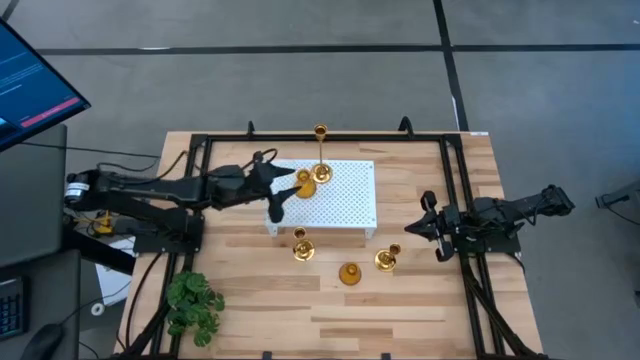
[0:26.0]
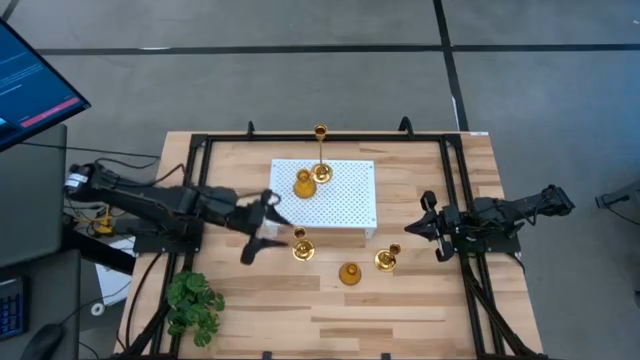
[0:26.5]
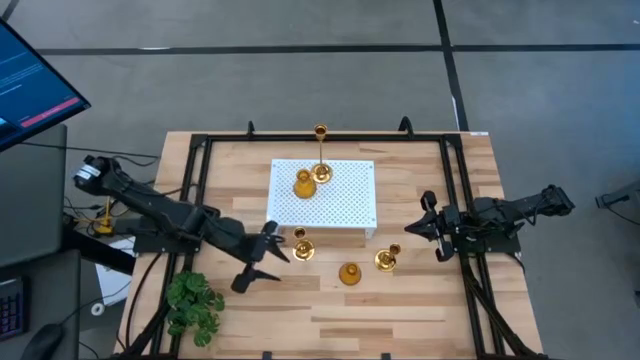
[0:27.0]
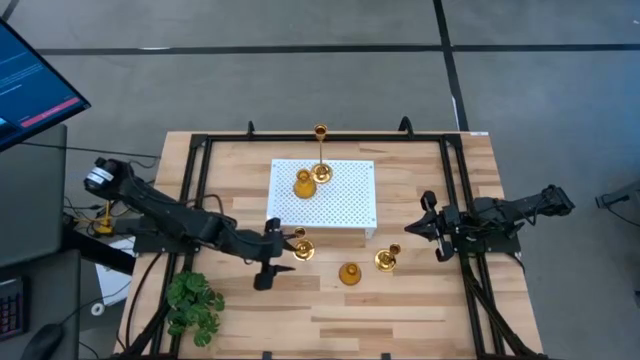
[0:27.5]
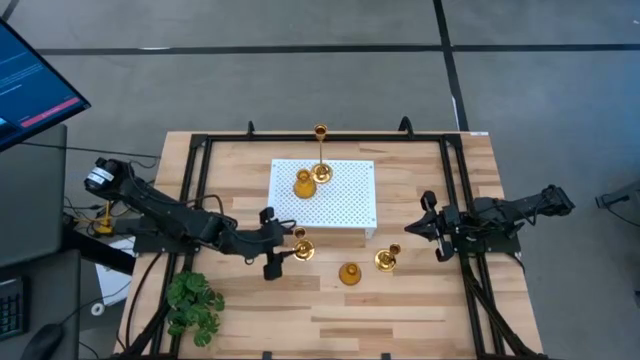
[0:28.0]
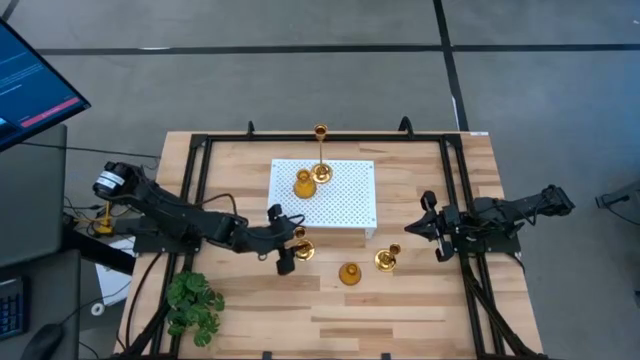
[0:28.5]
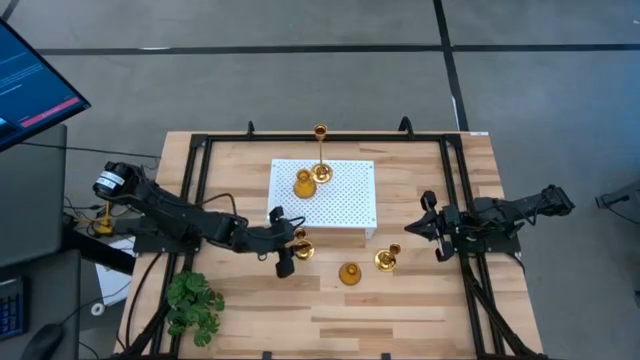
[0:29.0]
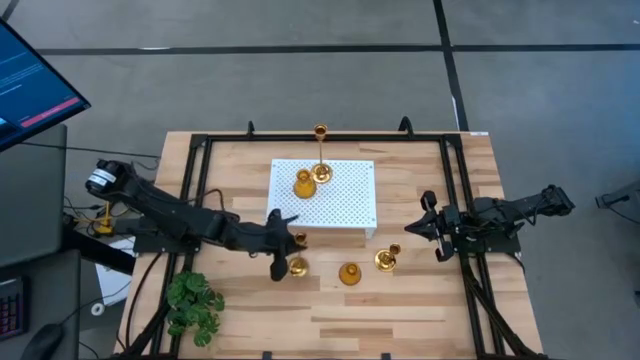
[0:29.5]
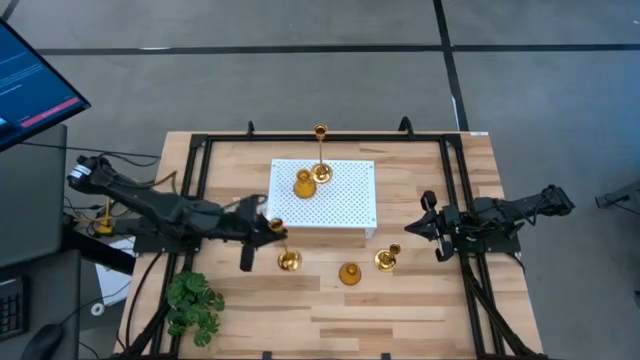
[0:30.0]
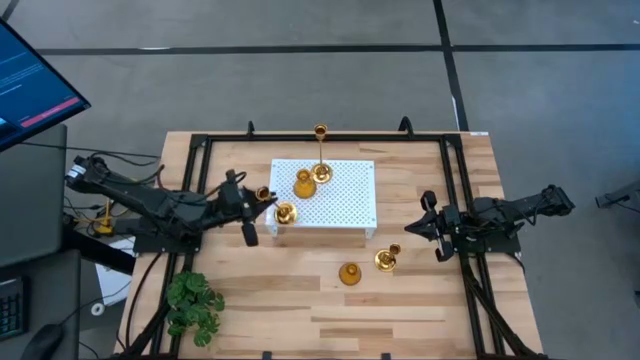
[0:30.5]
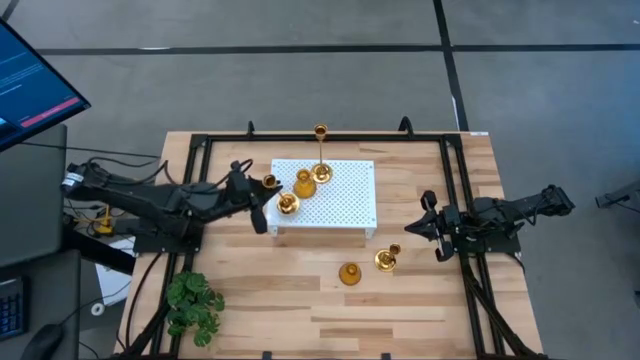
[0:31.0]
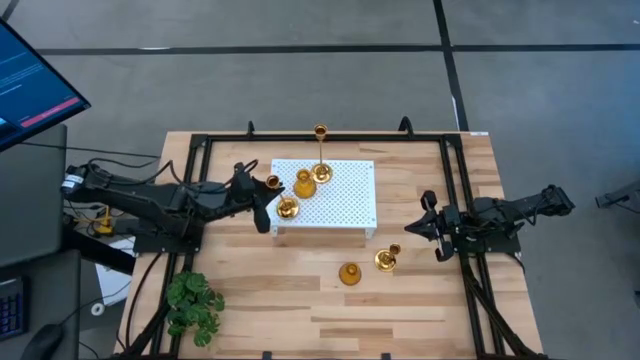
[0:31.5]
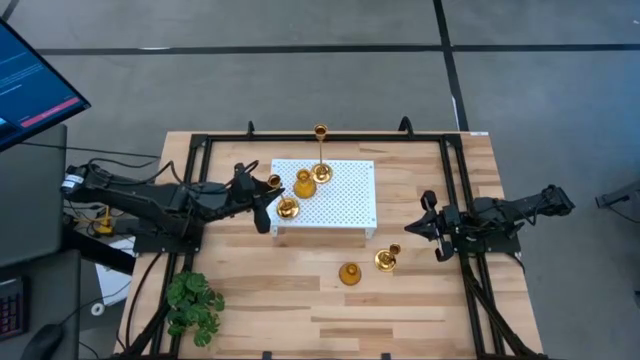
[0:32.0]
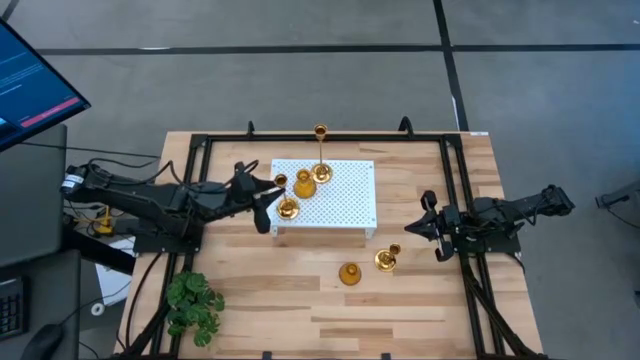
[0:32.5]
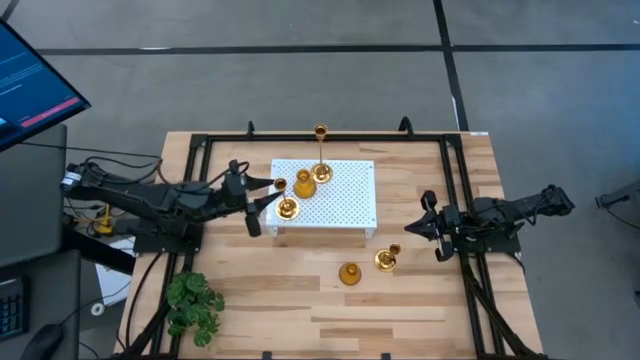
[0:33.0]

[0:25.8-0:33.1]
Task: Pick & Place candle stick holders
Put the left gold candle holder on the shelf

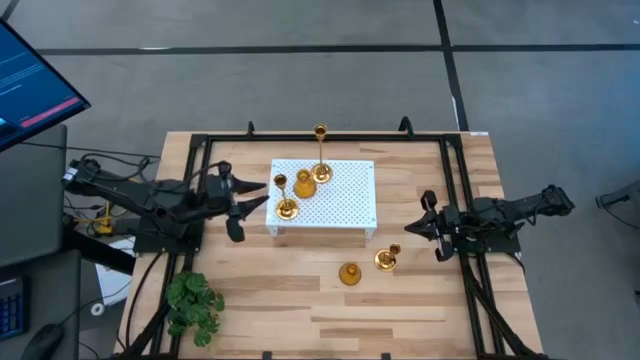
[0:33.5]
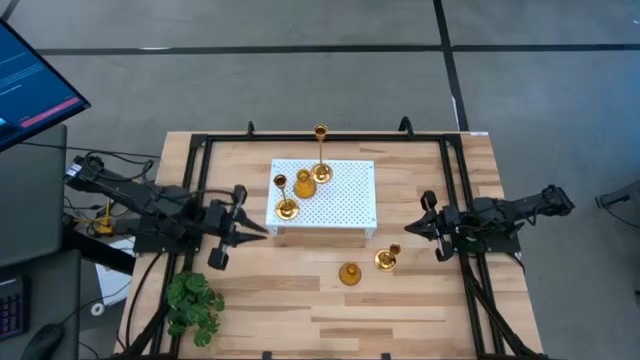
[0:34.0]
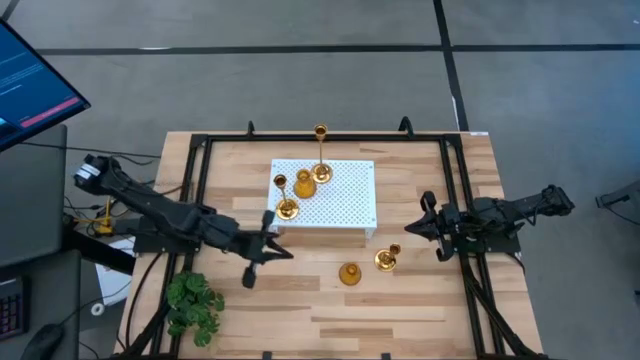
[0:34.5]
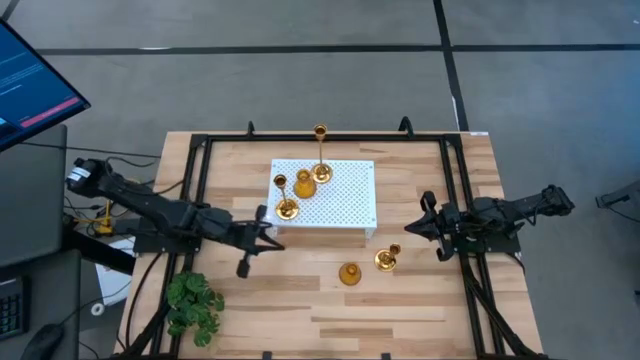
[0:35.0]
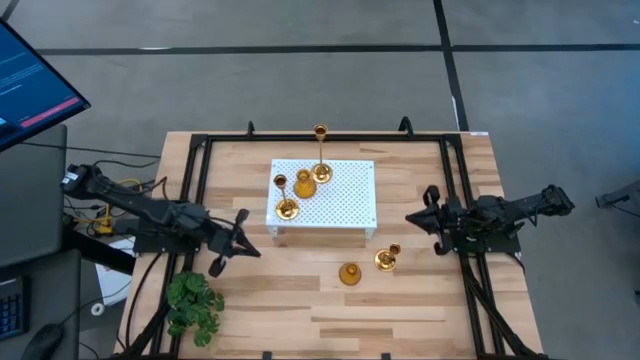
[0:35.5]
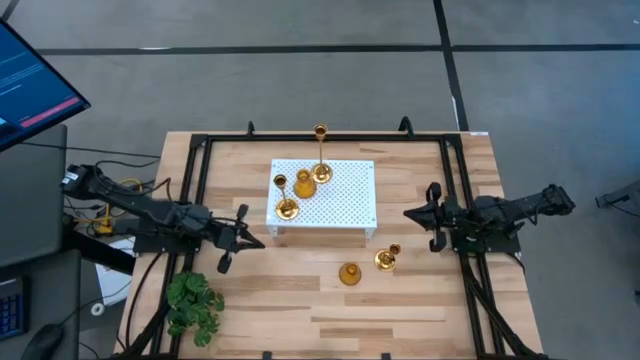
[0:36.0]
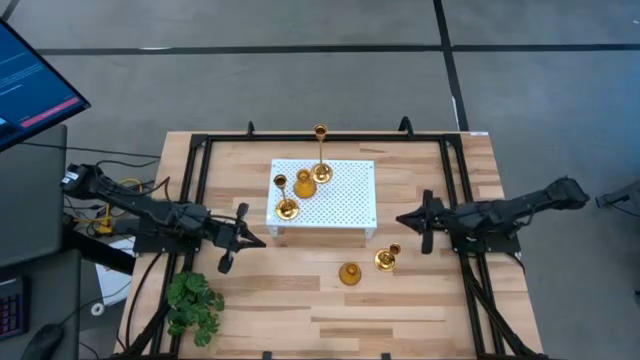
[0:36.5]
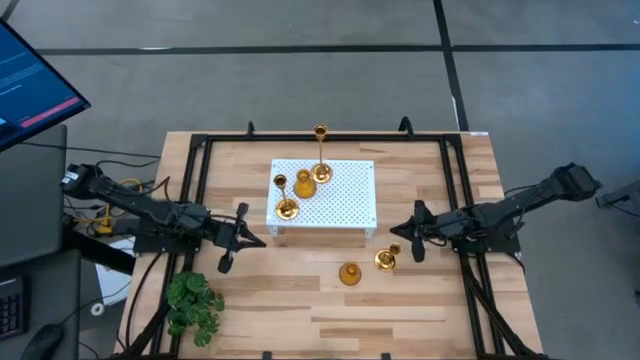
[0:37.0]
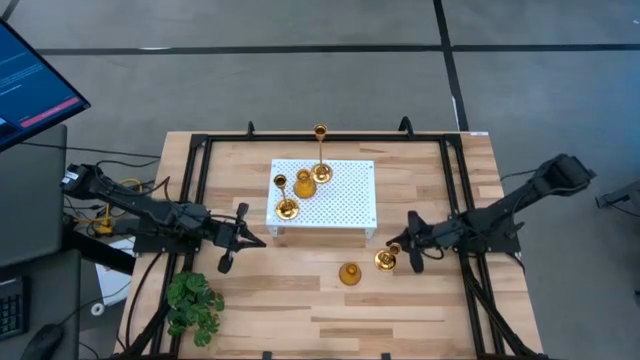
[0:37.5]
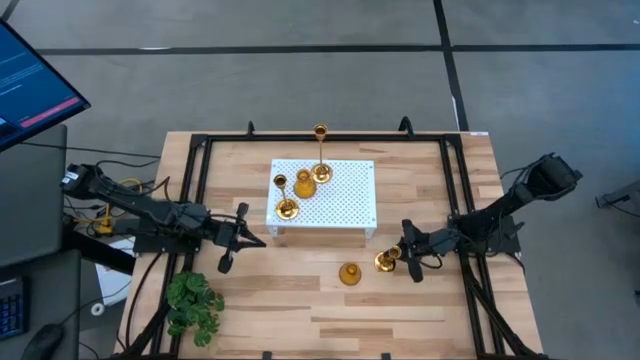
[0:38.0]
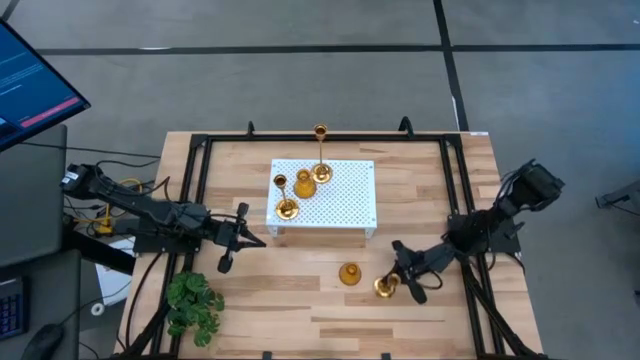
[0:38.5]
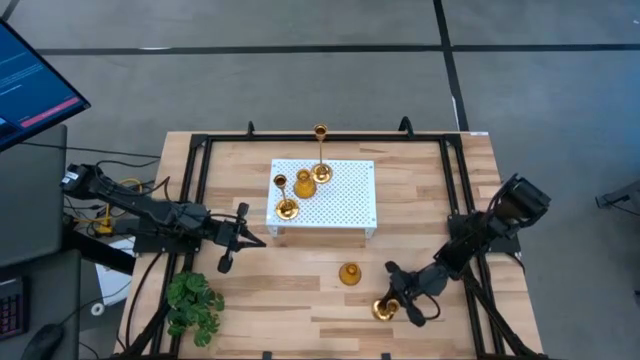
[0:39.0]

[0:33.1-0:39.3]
Move the gold candle holder to the bottom of the table

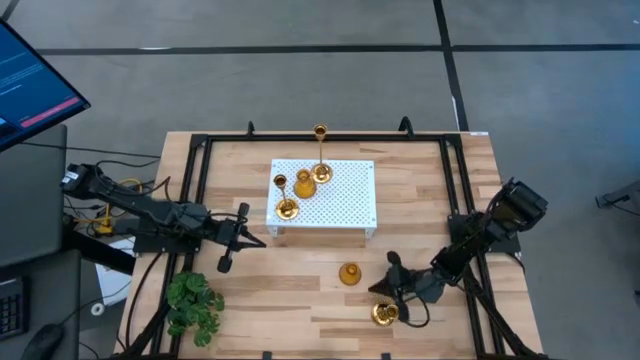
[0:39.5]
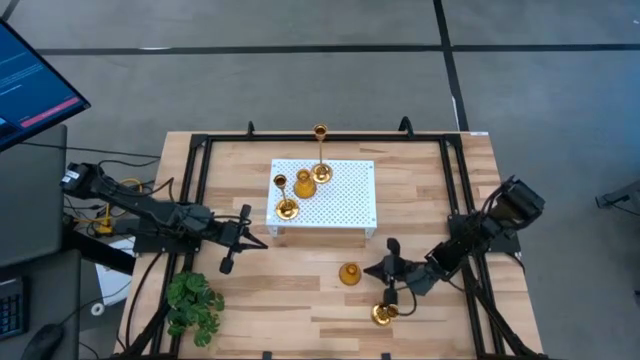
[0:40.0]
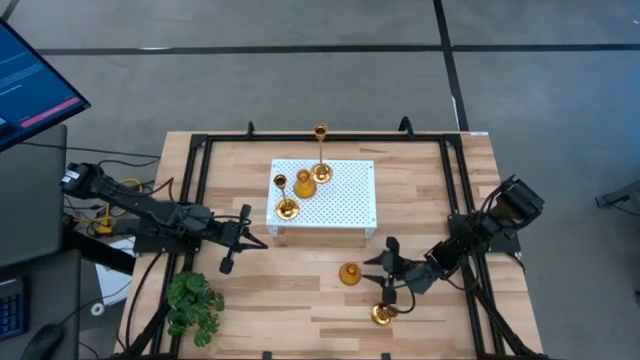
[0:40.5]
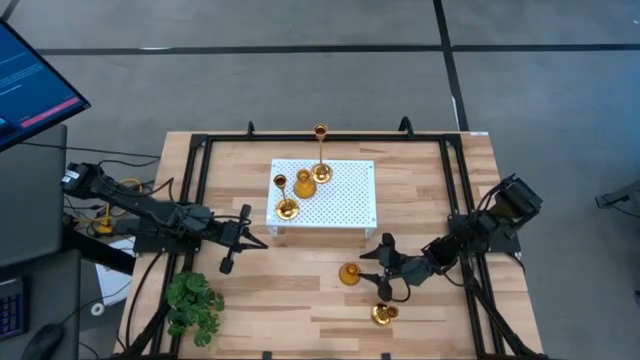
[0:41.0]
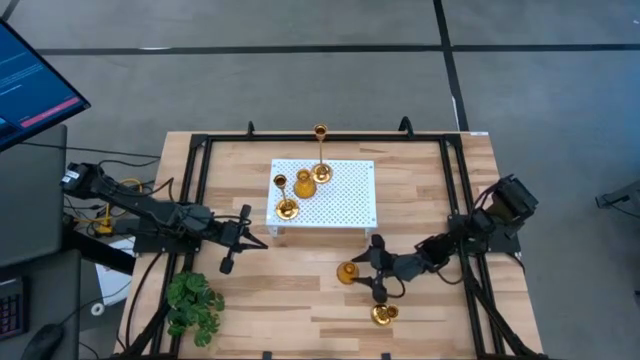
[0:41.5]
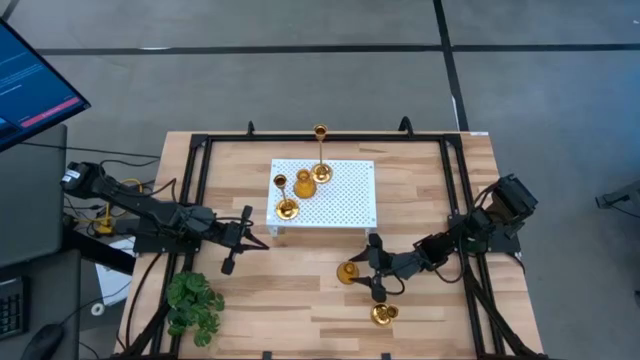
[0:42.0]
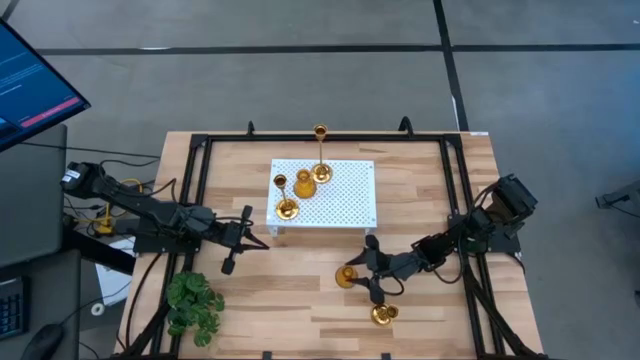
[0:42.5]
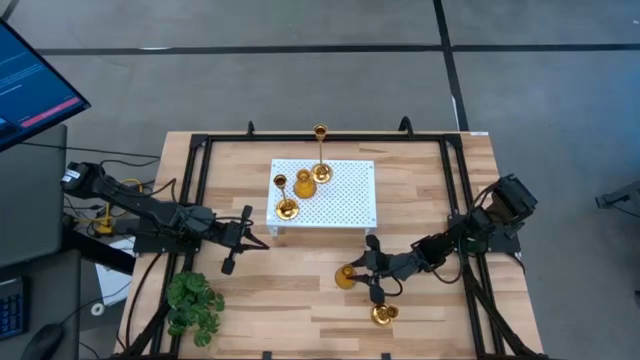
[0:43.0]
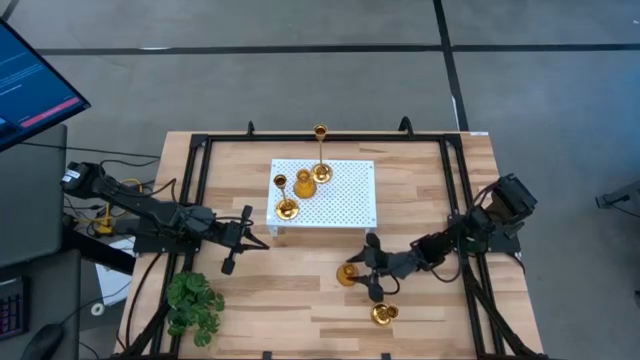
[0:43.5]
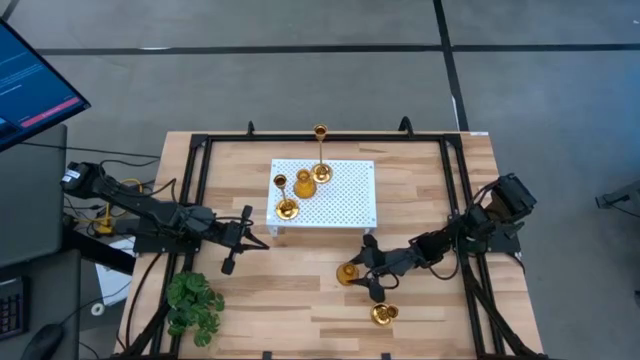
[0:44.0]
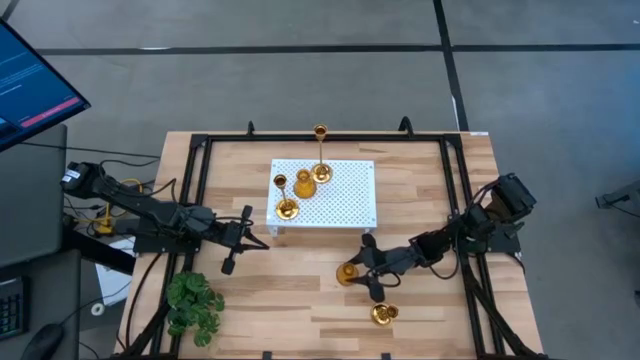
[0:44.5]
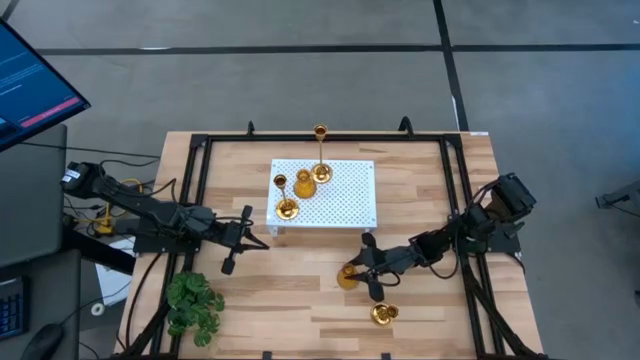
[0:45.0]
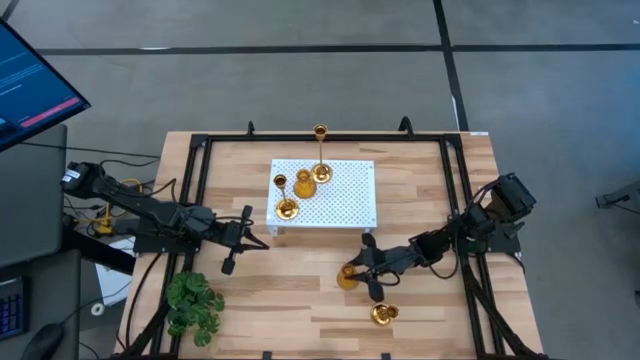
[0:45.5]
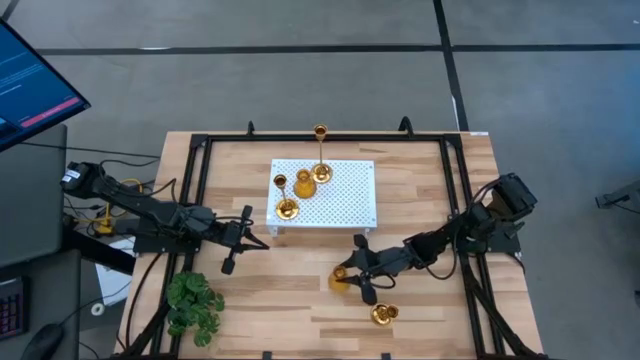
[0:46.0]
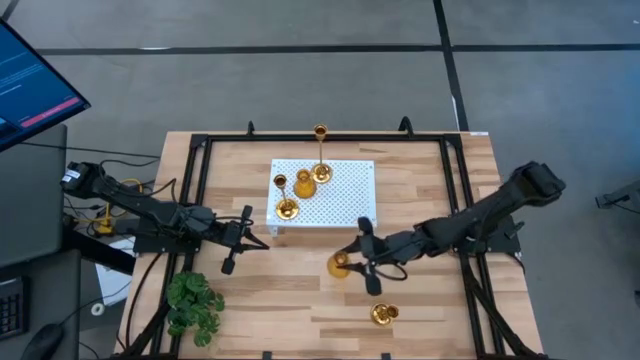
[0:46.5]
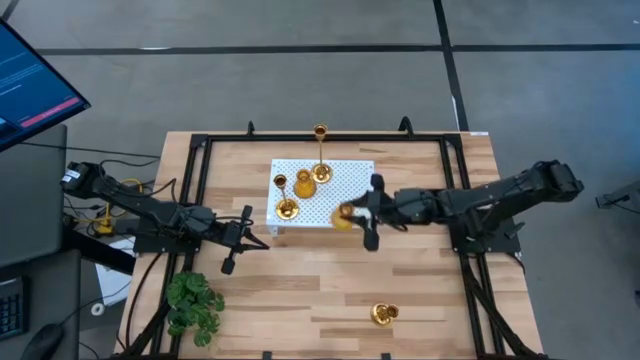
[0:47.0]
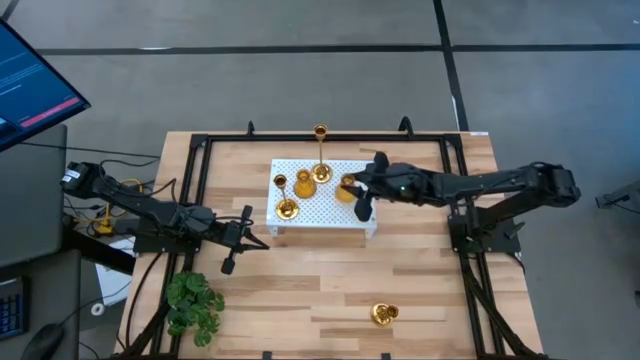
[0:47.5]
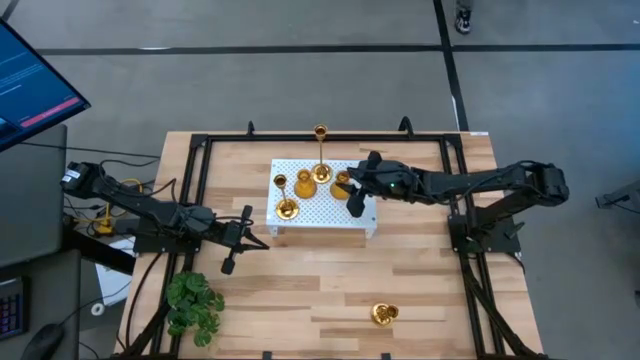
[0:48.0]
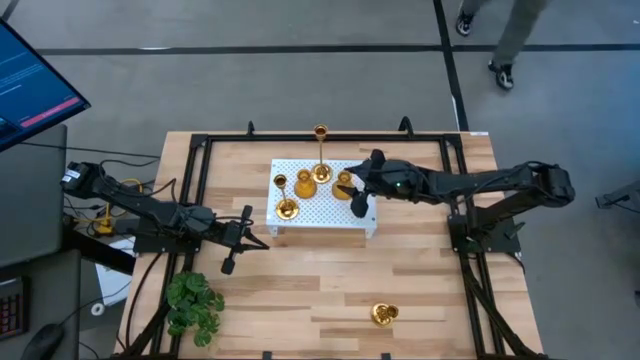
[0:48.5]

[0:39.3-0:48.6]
Put the orange candle holder on the shelf
